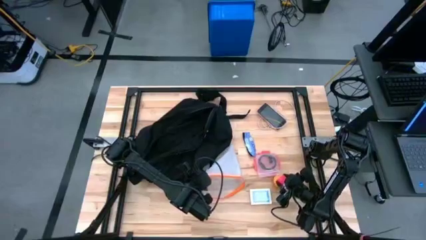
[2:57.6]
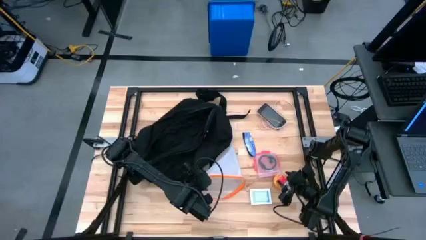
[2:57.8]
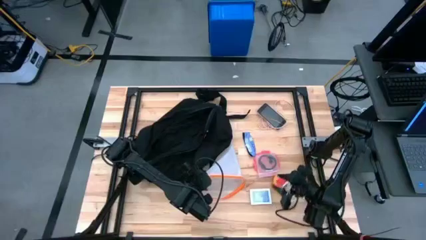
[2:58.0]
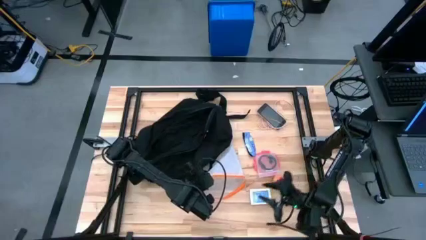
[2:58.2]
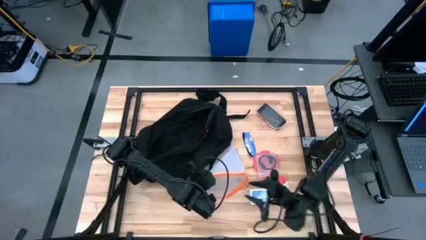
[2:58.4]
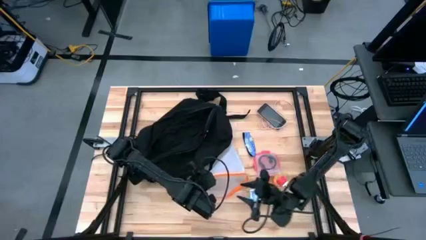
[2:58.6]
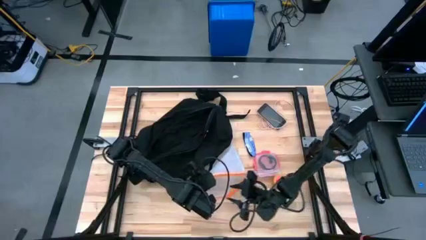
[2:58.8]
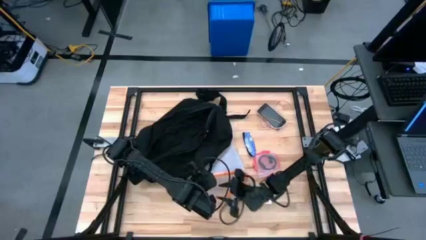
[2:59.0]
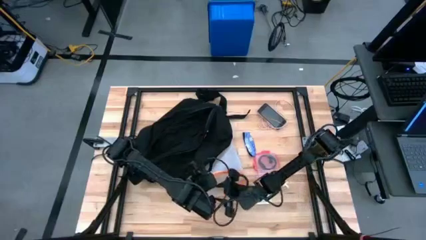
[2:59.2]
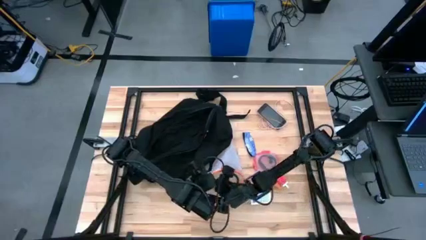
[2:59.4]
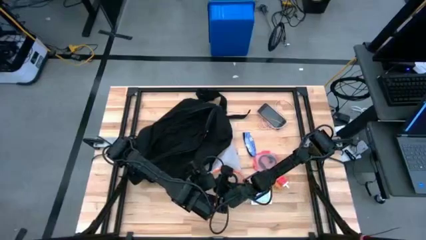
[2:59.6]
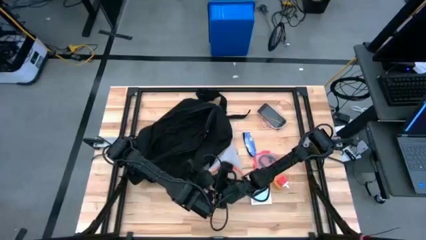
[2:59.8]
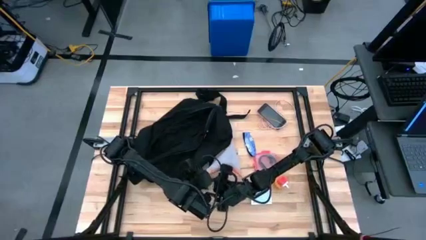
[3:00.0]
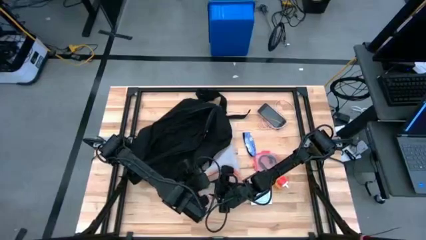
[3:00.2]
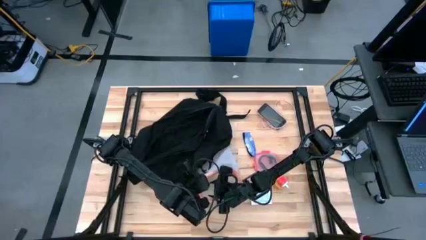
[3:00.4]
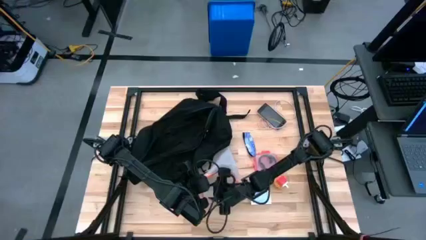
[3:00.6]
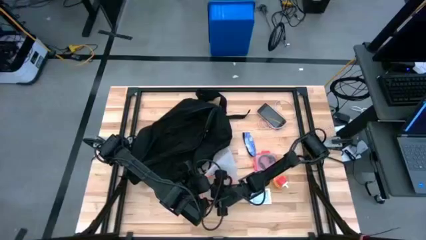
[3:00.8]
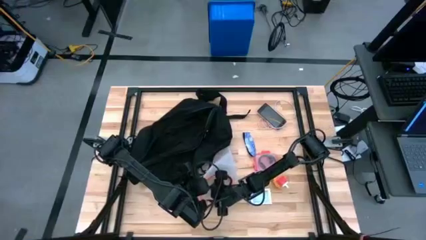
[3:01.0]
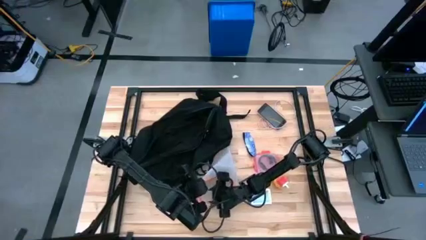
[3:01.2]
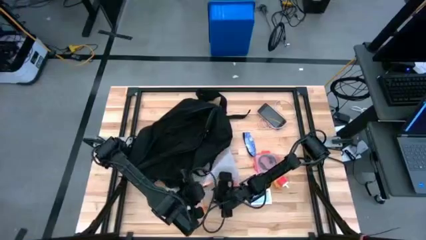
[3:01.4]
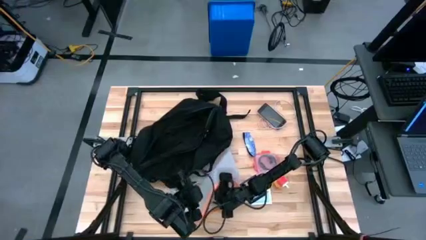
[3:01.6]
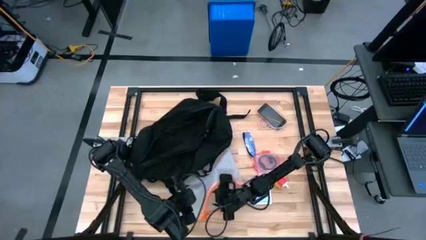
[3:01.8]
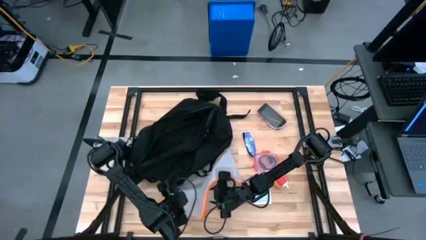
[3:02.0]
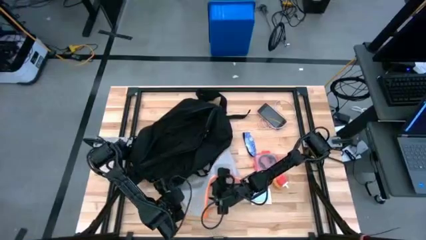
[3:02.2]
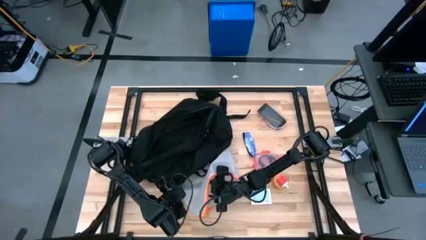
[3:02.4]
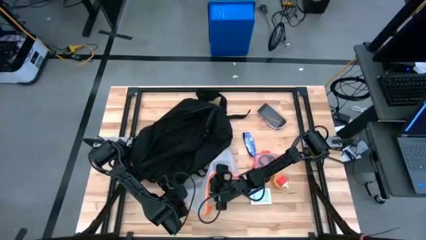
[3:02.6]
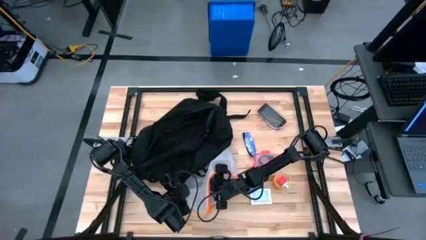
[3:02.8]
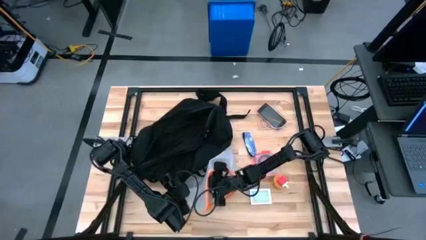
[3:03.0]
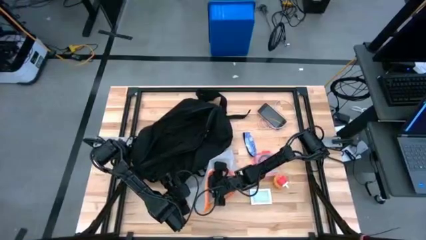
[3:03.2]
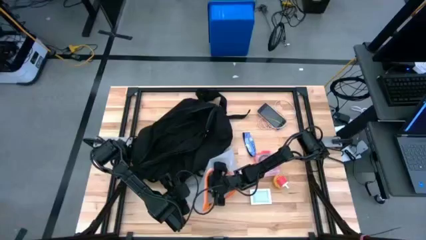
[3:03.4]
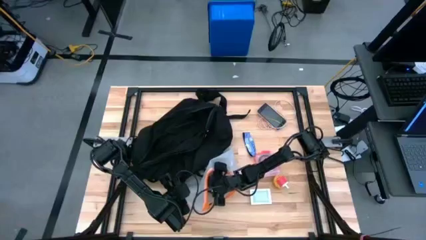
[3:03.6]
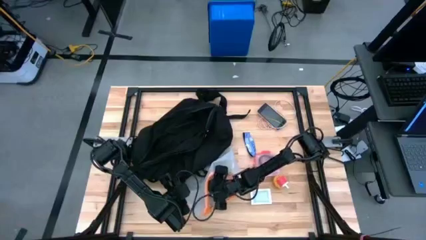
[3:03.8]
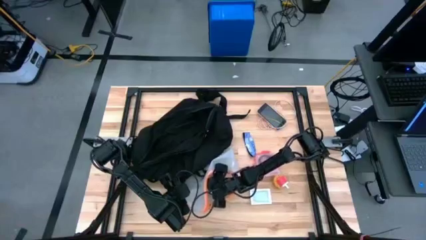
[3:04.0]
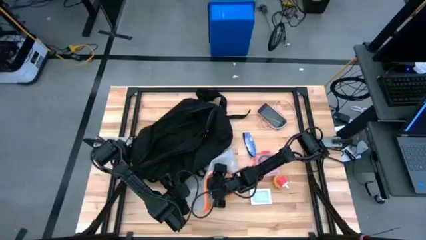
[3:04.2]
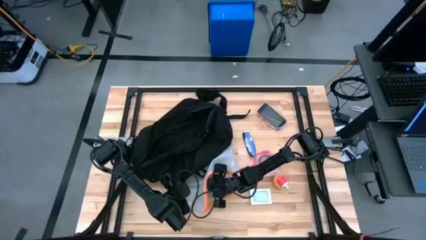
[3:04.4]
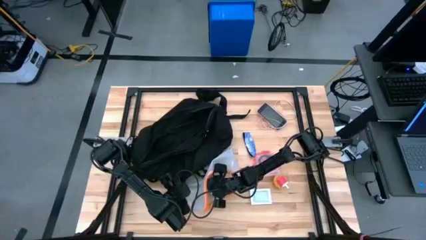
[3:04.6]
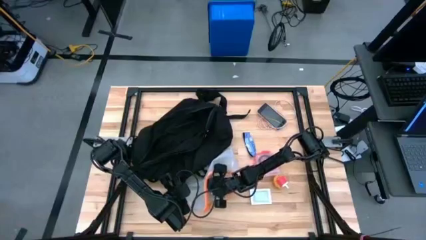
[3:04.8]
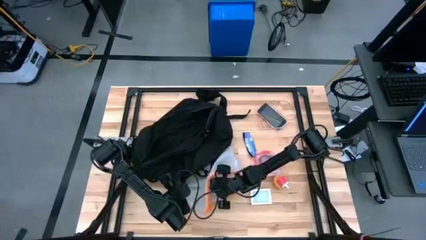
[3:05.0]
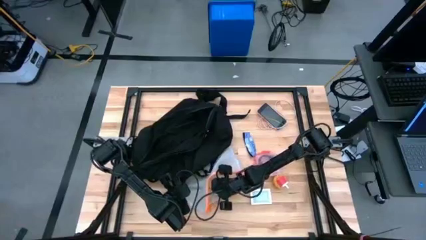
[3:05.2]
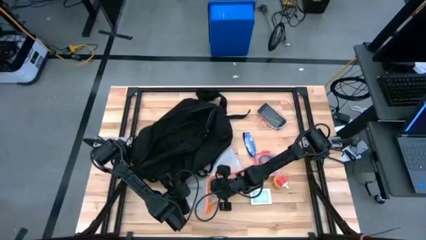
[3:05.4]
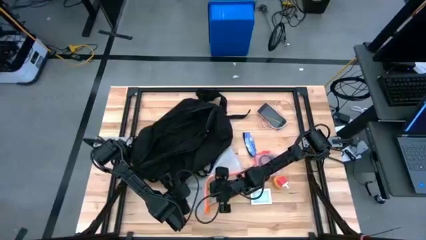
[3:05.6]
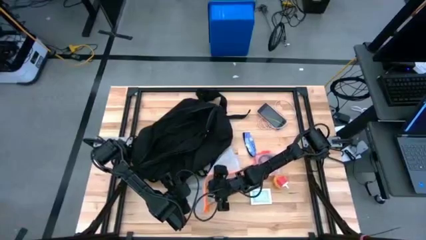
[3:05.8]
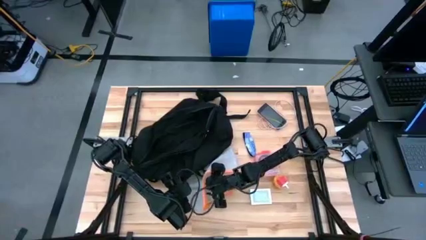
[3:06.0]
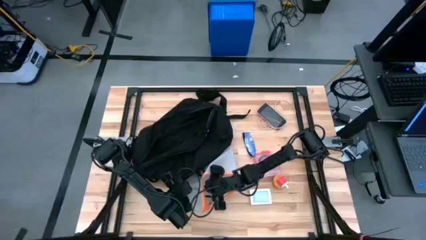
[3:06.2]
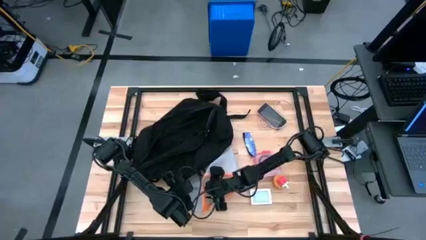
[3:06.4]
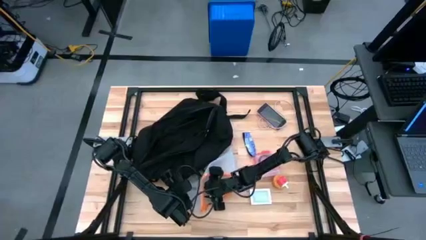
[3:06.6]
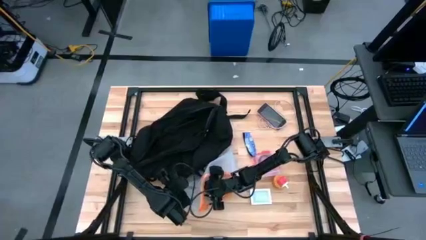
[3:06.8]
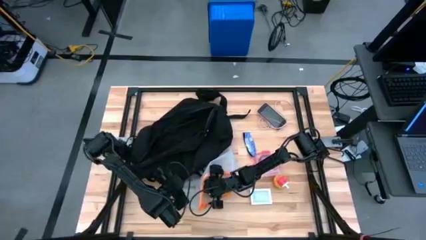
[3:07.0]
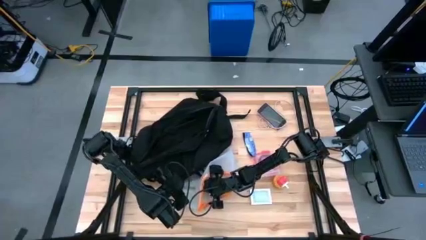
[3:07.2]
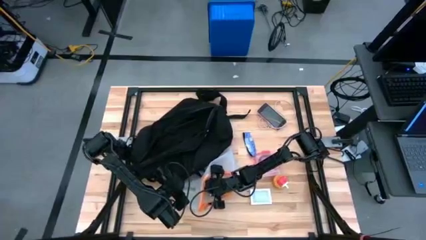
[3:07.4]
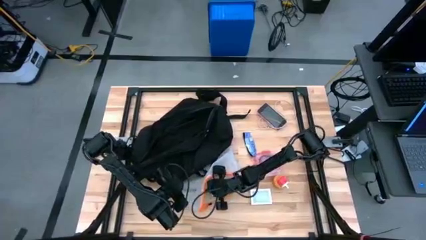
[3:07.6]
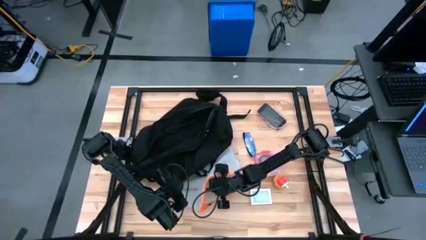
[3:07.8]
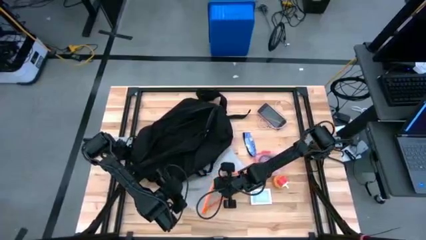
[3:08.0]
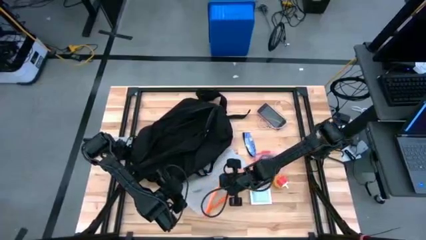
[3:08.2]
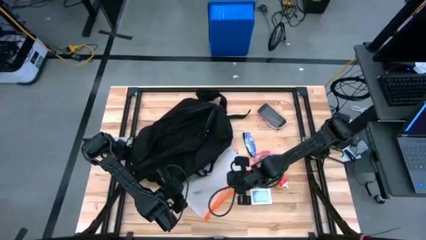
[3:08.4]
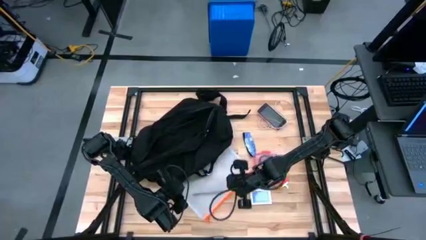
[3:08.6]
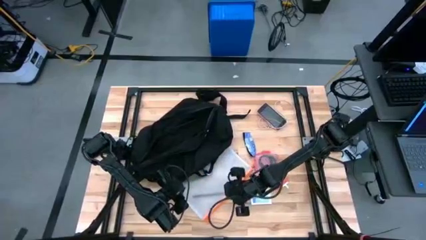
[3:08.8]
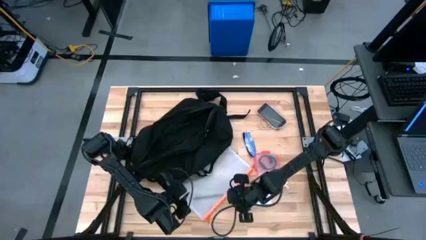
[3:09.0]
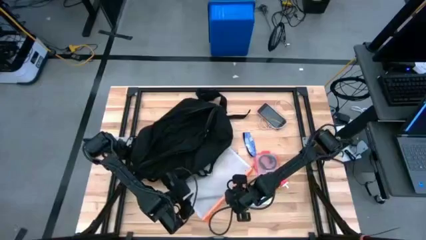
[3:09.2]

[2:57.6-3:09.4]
Task: Unpack backpack
Remove the black pen from the orange zip bag

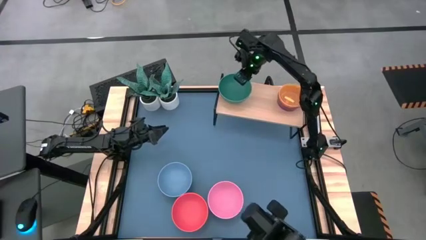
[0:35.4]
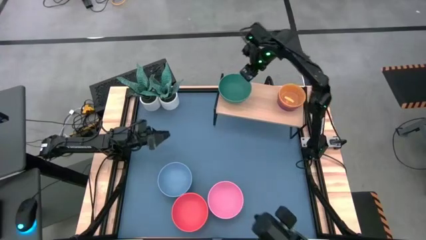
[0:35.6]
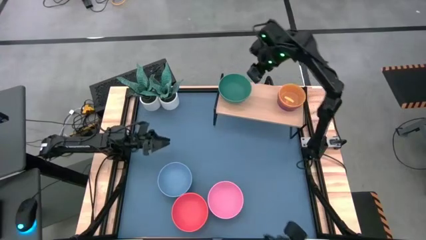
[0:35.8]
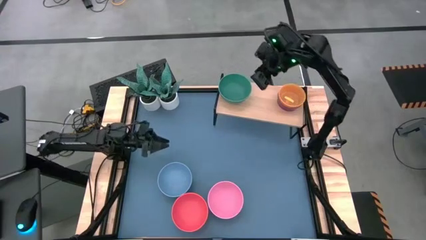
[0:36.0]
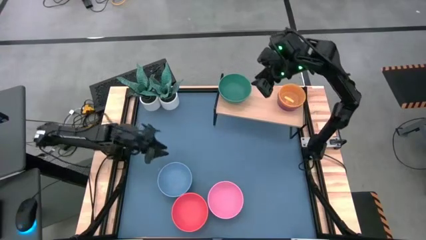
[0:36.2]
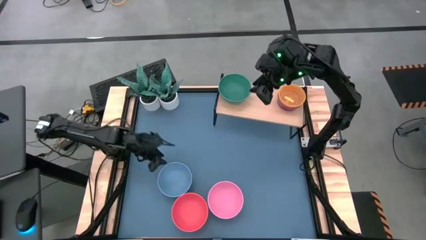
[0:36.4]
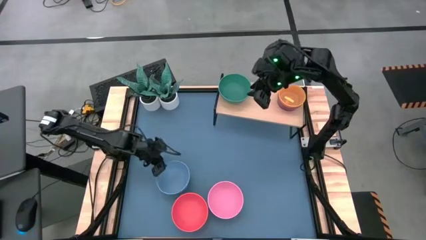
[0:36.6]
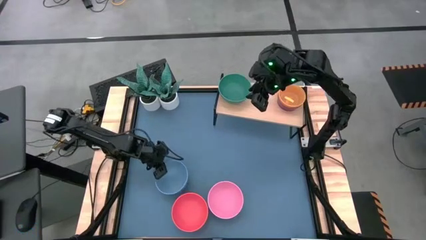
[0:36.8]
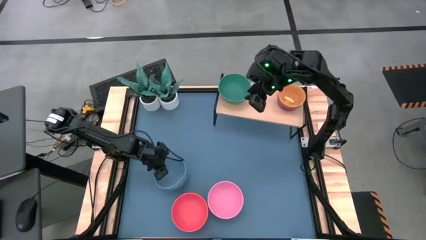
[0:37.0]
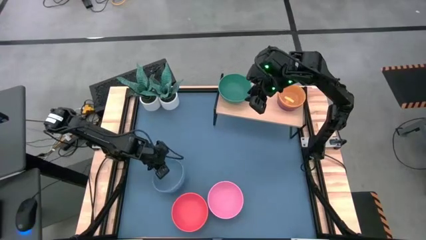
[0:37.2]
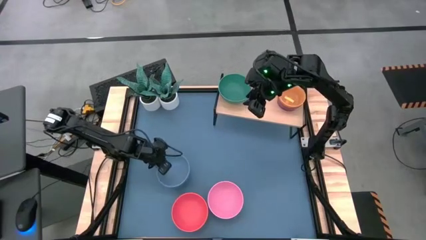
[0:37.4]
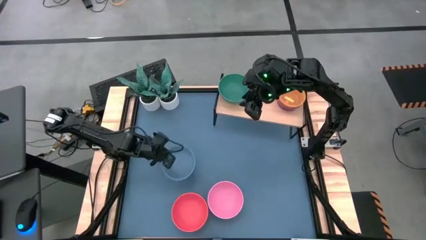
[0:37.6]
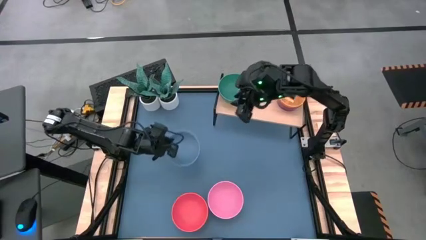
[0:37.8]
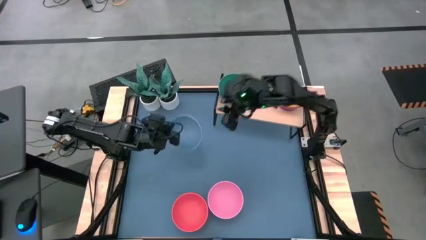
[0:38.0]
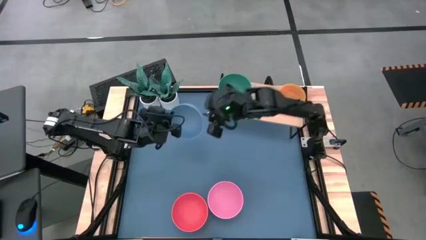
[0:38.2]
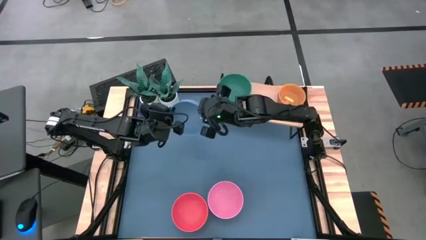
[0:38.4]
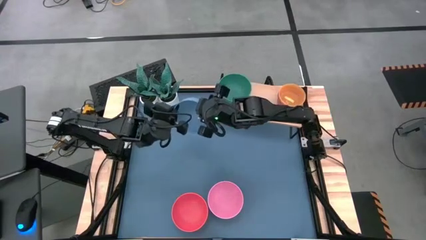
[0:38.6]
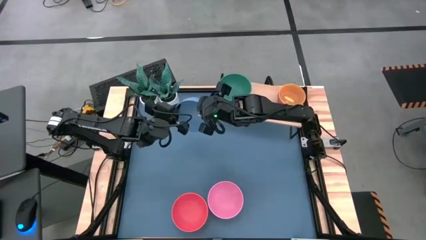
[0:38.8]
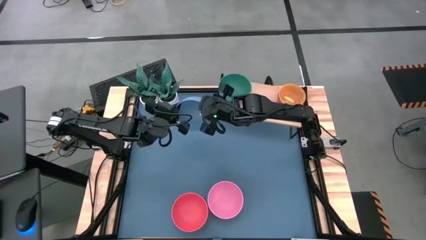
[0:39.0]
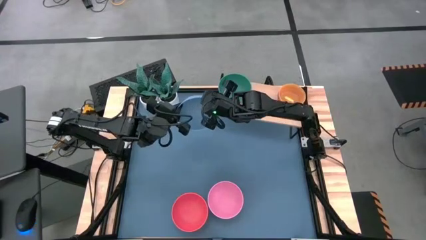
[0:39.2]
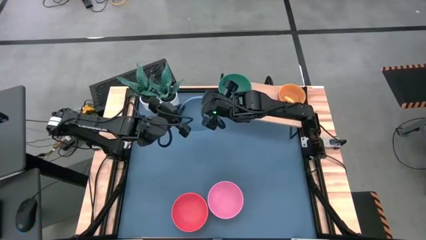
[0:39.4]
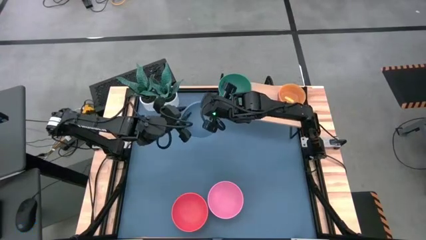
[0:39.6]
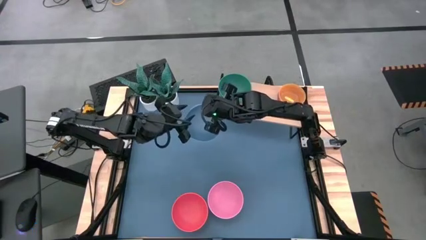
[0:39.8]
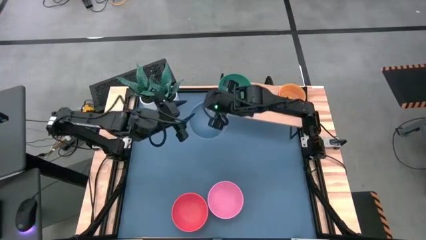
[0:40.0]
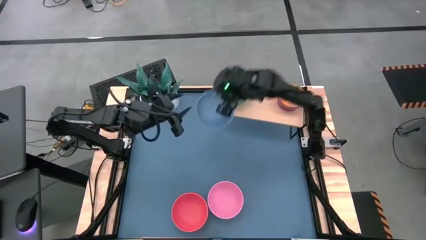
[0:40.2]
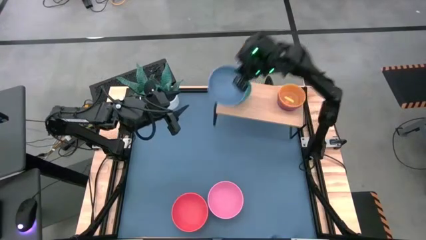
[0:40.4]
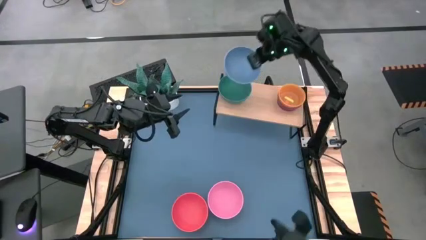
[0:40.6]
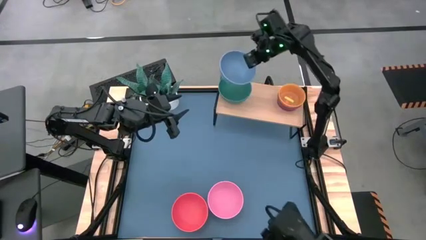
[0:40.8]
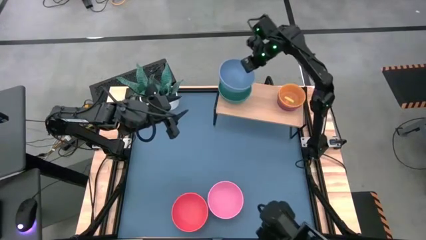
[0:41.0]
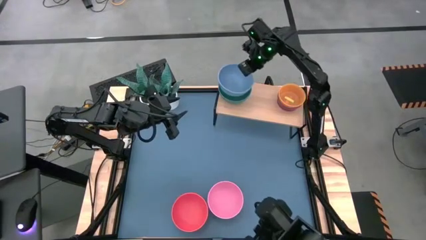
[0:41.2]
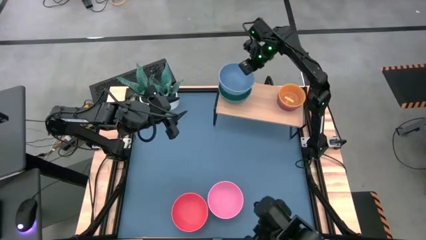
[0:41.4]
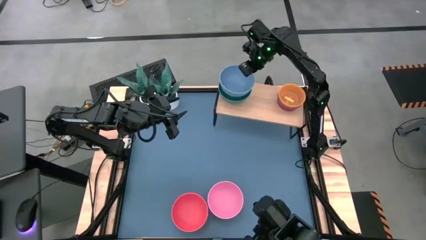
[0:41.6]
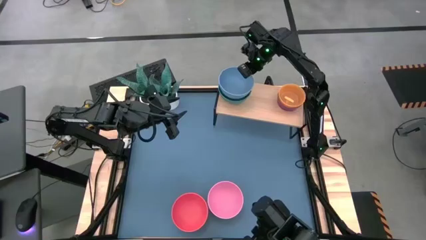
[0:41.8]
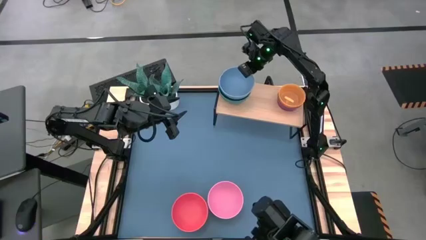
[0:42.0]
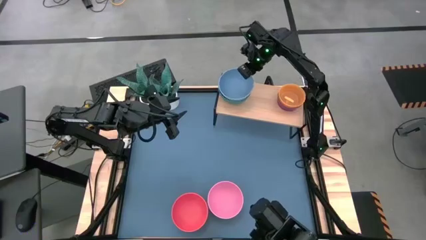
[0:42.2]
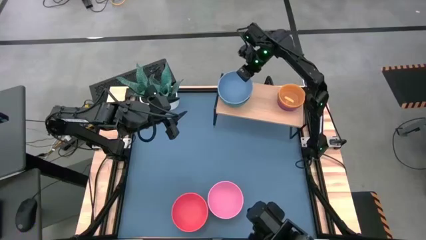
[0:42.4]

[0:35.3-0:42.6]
Task: Place and stack bowls onto a shelf
Stack the big blue bowl on top of the big green bowl on the shelf
